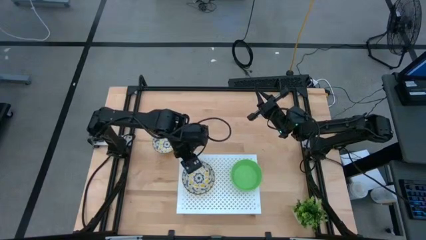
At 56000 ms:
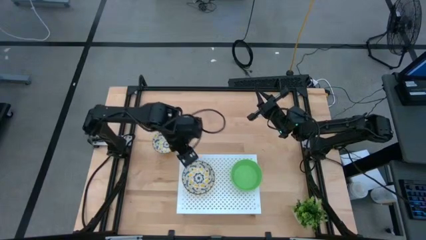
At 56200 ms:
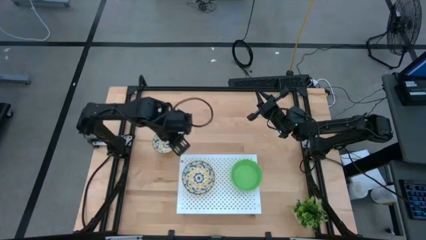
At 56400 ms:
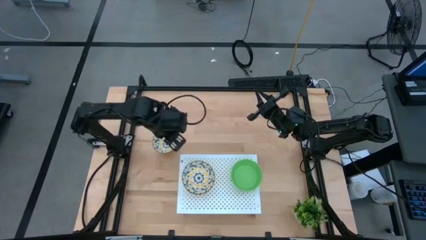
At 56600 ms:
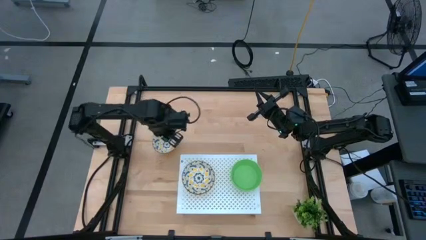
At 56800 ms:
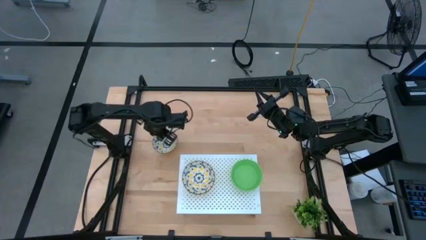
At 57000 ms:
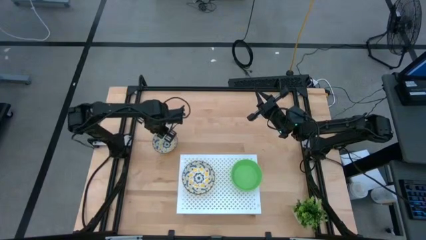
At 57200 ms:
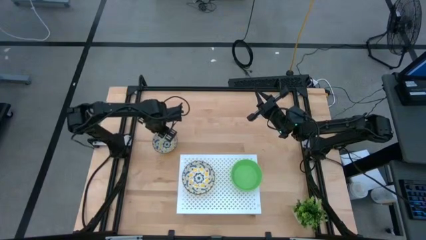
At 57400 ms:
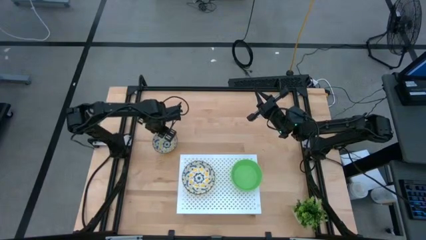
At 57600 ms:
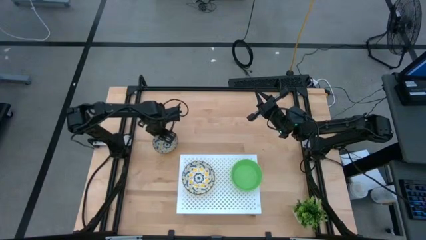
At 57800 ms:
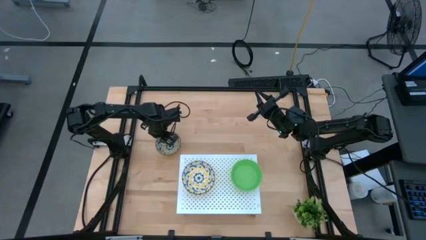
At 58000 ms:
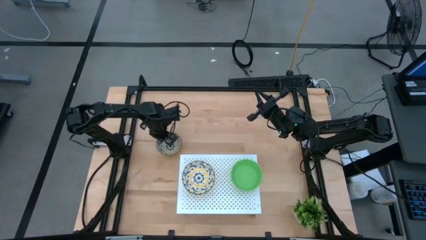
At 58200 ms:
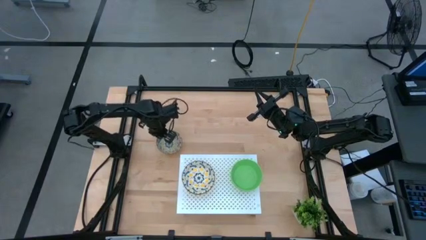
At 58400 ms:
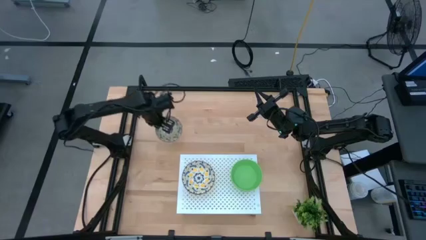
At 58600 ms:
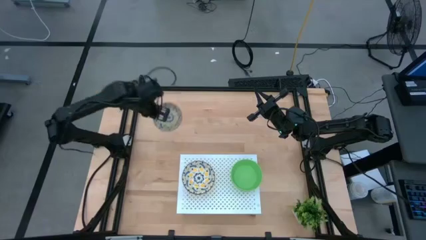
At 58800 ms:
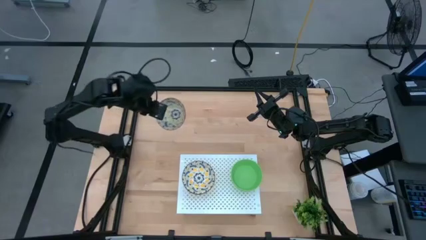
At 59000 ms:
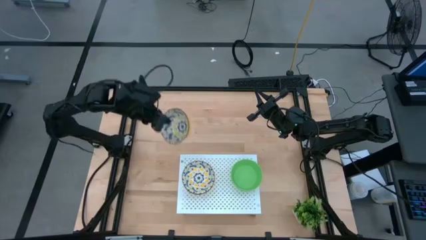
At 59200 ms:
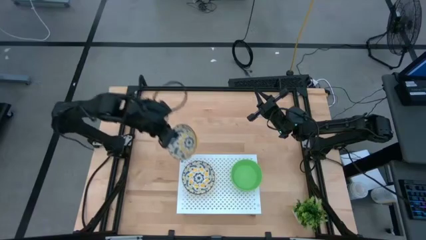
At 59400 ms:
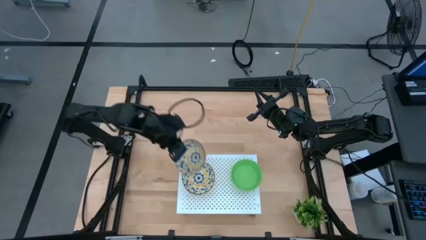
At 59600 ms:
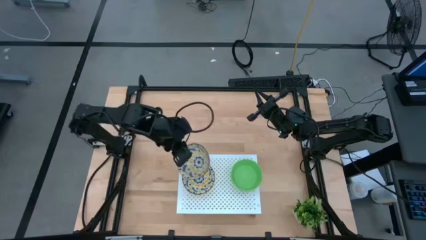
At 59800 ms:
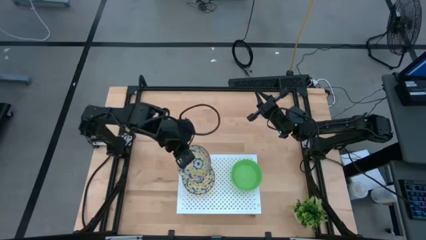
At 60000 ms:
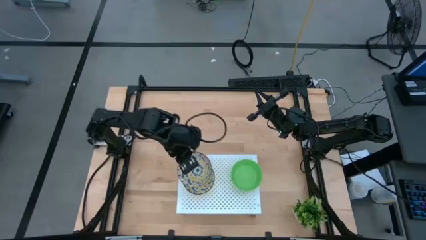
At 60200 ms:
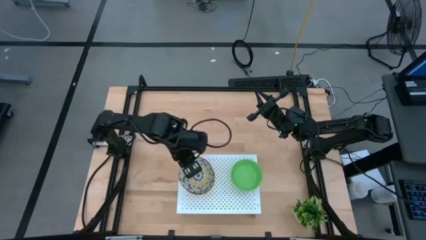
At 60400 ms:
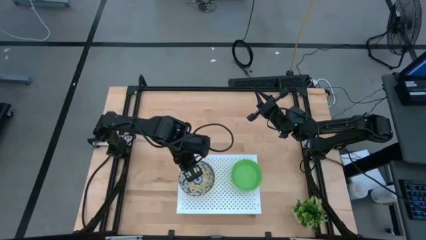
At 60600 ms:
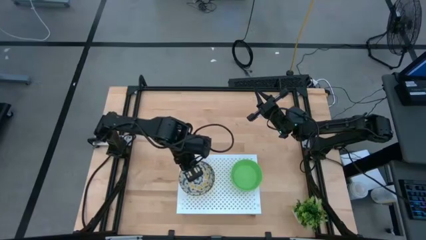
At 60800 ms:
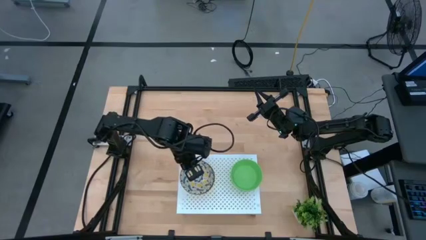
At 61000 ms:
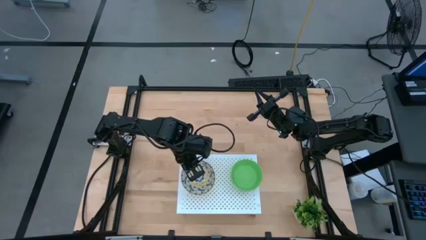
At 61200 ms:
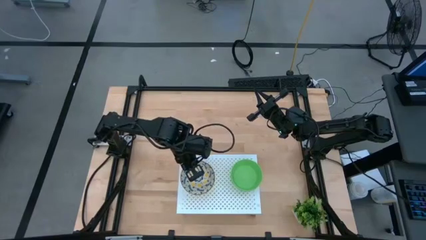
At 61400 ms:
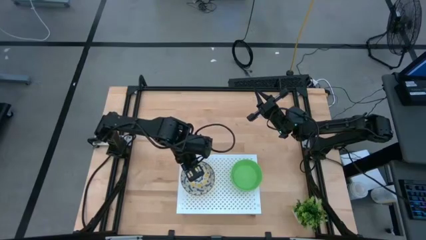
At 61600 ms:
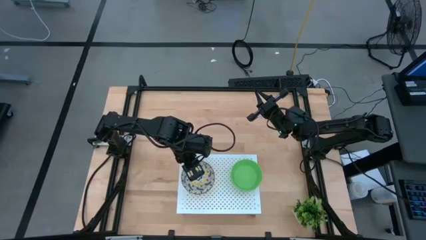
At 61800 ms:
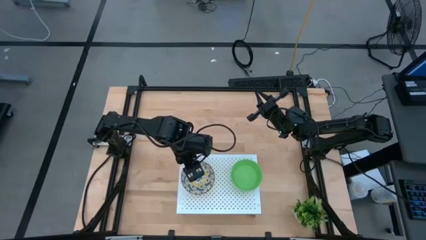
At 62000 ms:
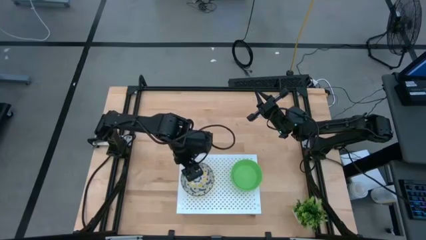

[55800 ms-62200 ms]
Task: Pick & Place Mini bowls
Stack the white bowl on the top of the white bowl on the shelf
